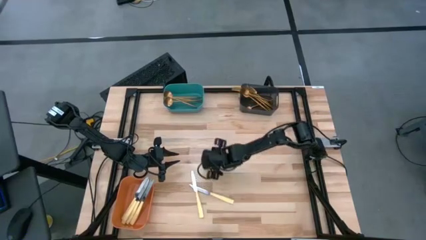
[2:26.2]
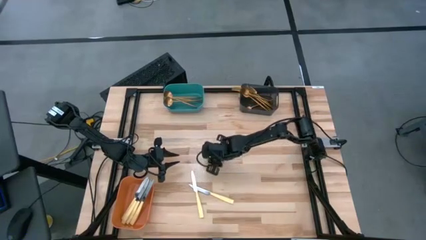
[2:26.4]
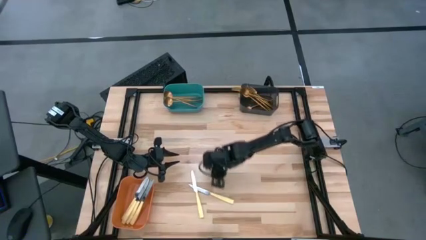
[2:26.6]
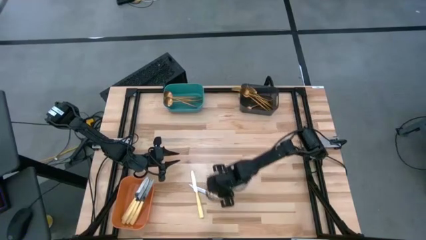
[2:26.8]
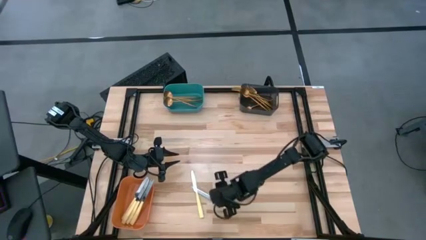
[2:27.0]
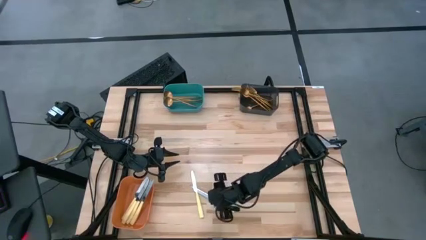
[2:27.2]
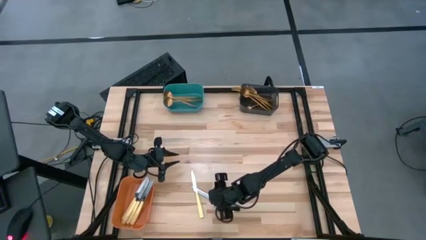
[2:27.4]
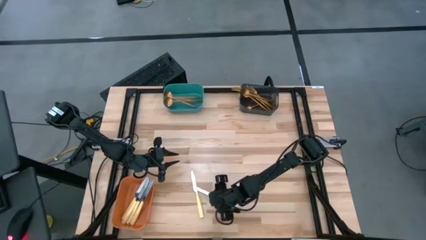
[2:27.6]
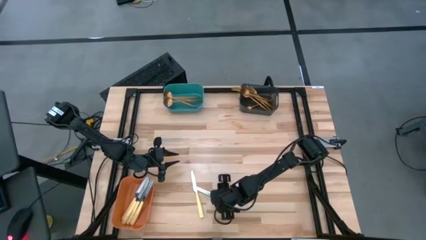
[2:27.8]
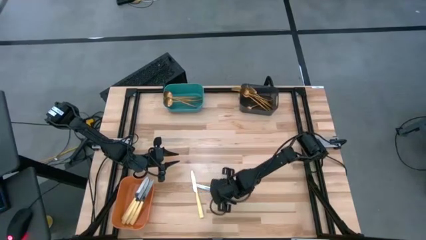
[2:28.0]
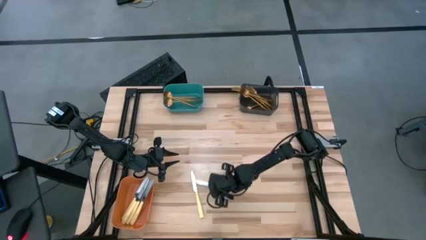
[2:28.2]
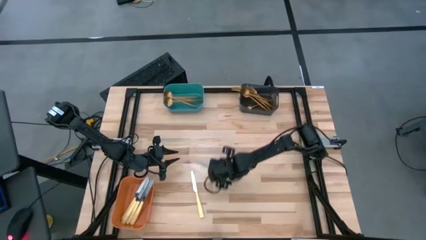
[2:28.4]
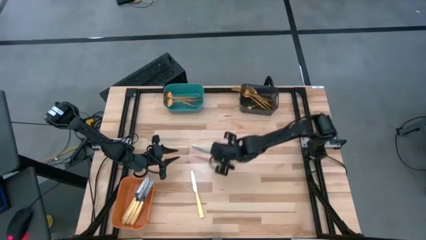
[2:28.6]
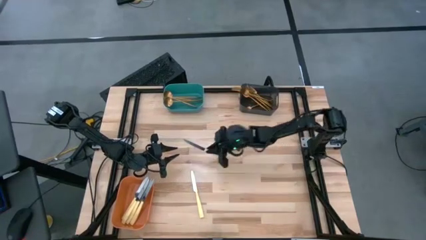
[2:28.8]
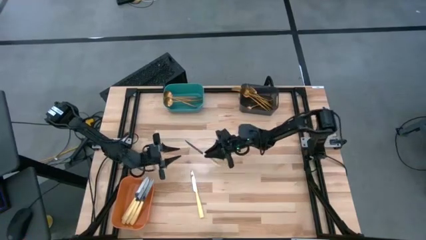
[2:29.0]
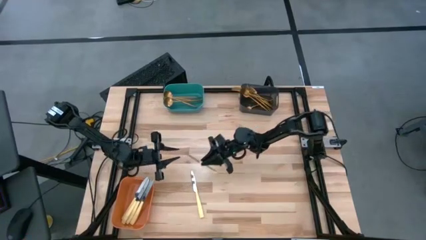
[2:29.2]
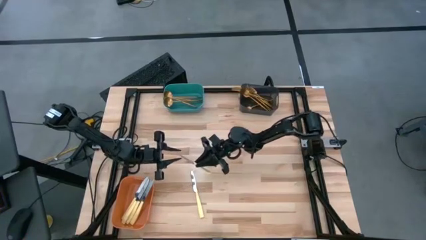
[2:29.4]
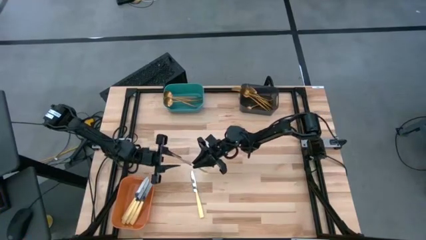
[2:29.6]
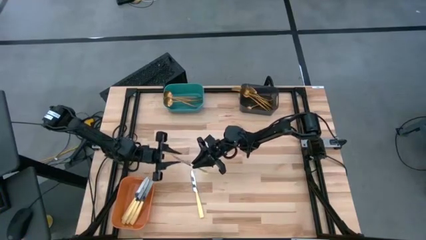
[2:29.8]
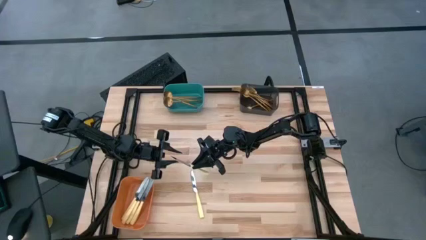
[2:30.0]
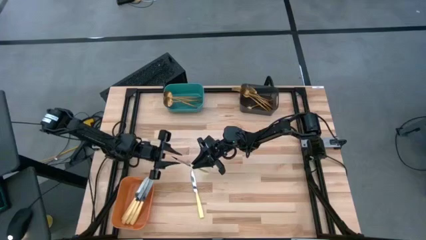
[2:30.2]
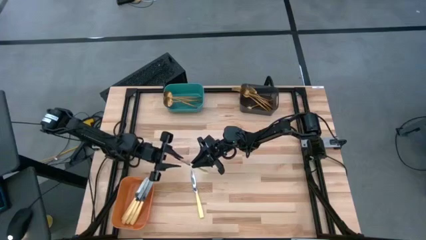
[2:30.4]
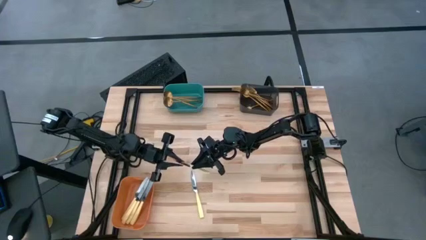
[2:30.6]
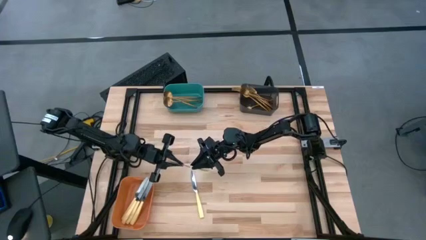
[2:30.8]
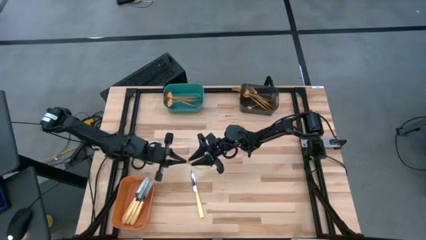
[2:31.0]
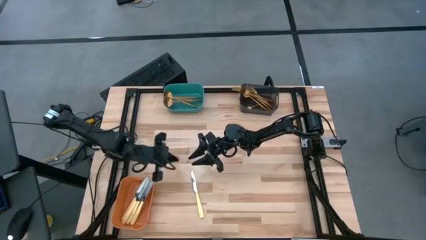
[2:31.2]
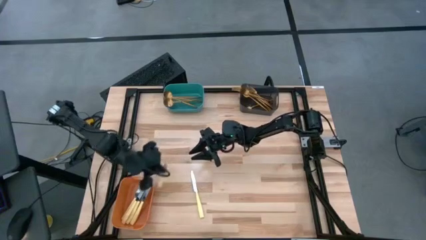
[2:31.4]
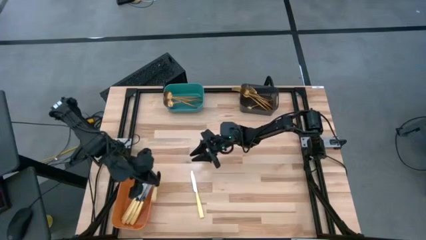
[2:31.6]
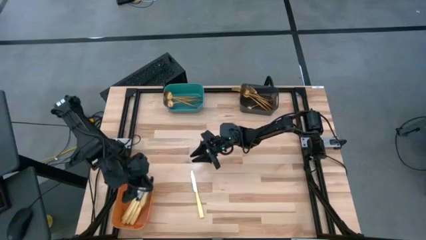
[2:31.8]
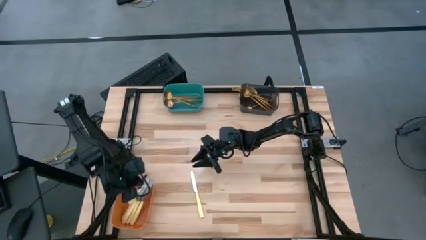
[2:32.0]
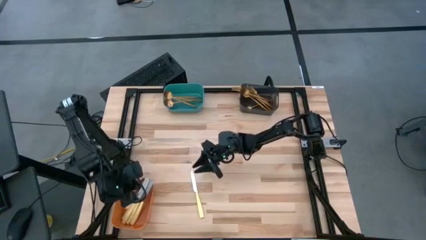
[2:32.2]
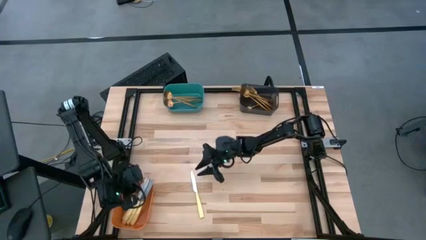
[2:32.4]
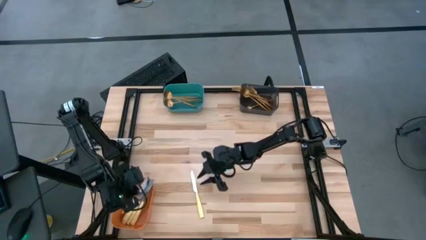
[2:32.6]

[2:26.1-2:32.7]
Task: Sort silverware by color (type)
Put the yellow table knife into the orange bin

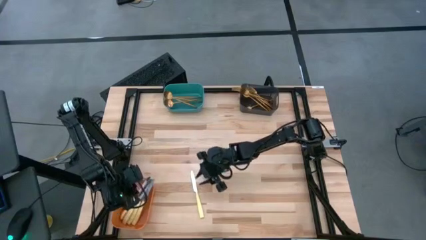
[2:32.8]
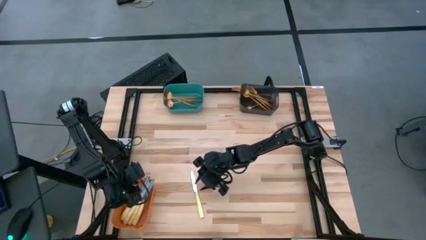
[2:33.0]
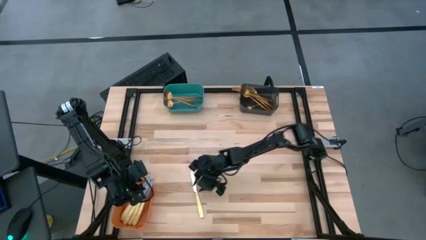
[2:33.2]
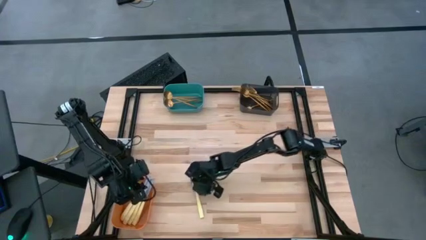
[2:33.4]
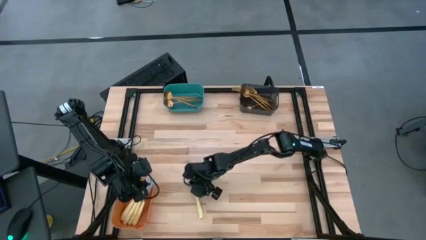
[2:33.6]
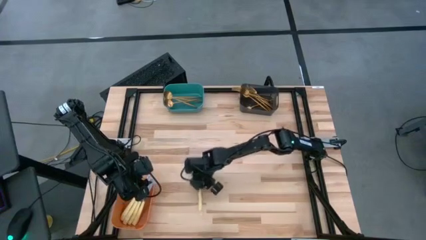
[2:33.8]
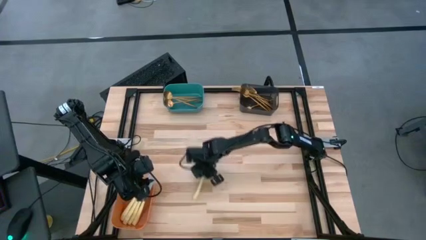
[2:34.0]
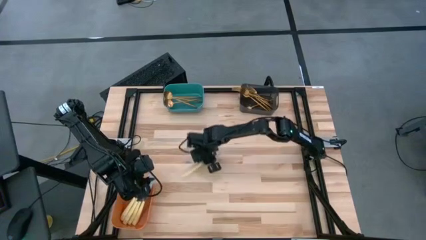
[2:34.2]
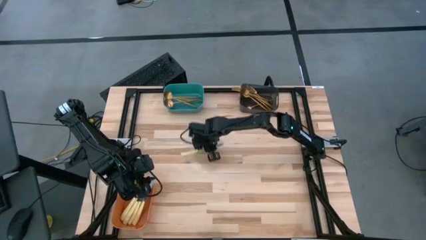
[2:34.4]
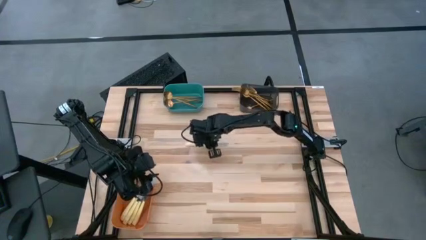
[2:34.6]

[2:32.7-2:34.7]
Put the yellow table knife into the orange bin

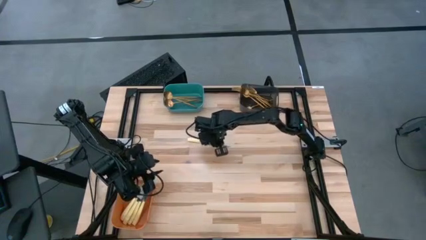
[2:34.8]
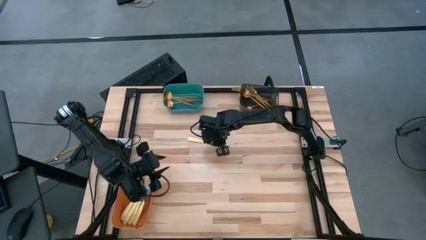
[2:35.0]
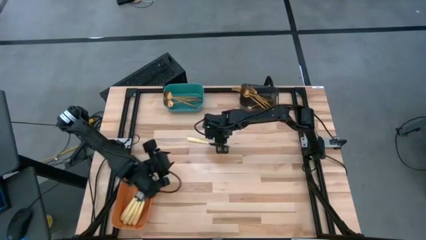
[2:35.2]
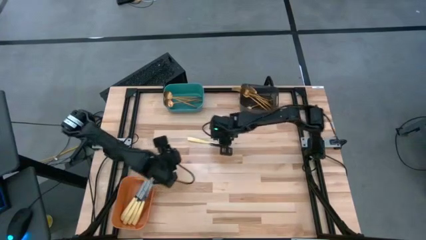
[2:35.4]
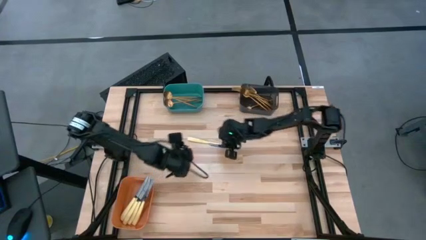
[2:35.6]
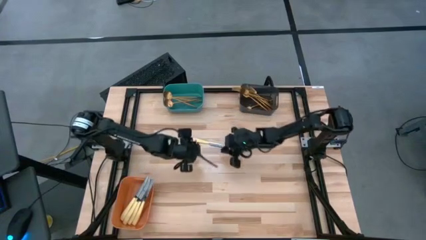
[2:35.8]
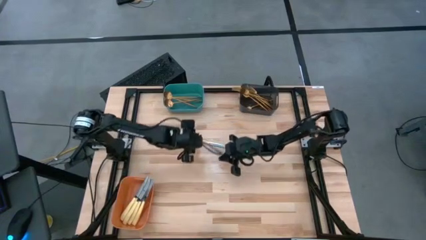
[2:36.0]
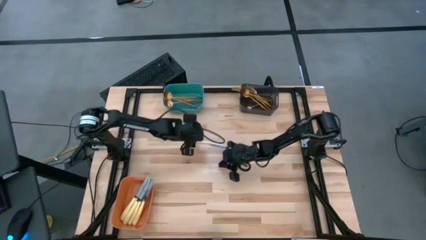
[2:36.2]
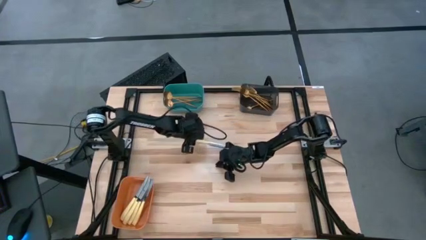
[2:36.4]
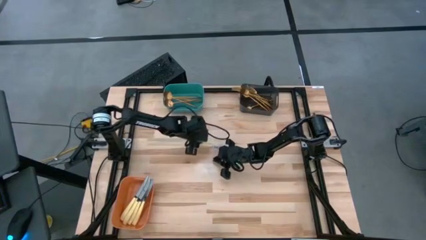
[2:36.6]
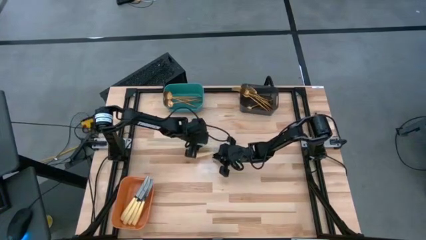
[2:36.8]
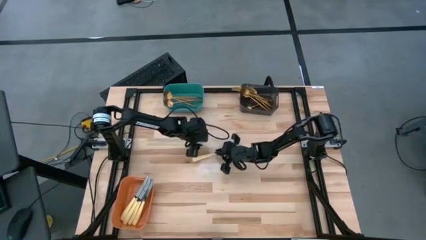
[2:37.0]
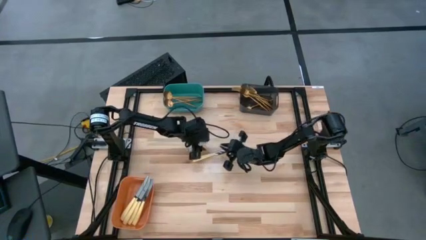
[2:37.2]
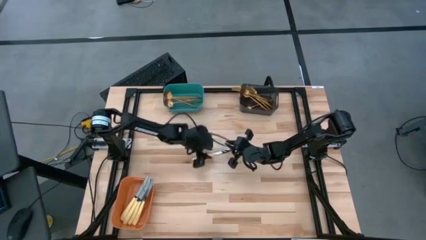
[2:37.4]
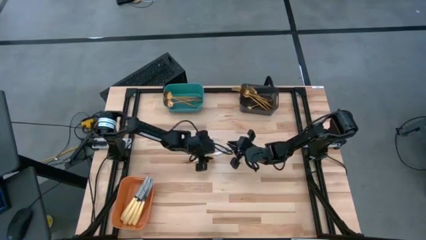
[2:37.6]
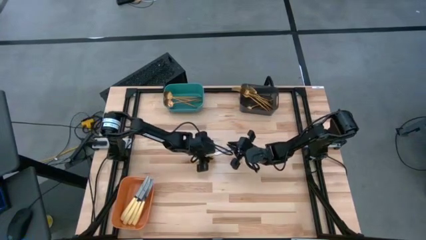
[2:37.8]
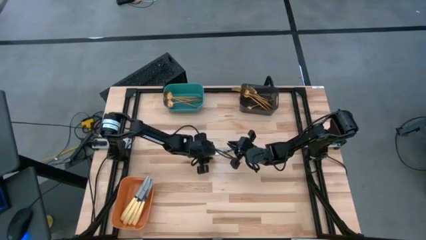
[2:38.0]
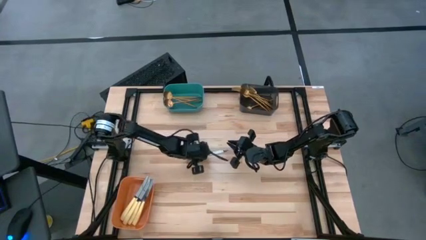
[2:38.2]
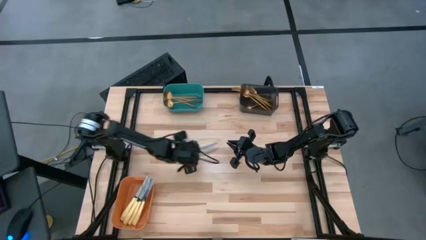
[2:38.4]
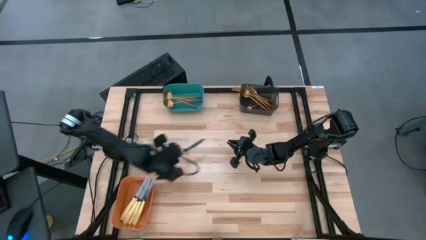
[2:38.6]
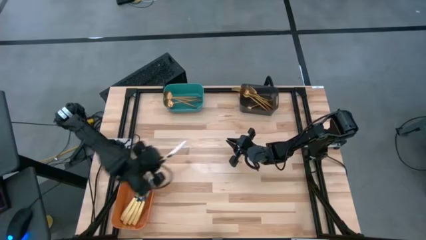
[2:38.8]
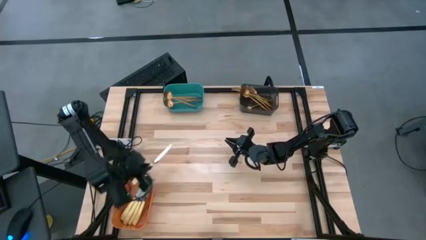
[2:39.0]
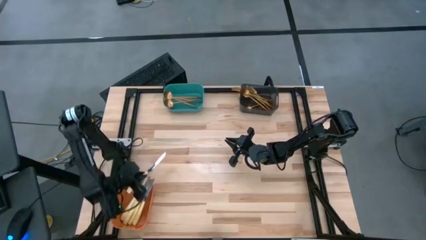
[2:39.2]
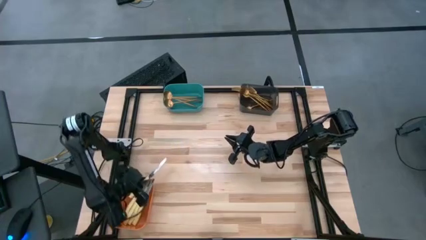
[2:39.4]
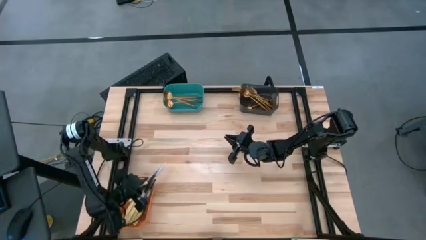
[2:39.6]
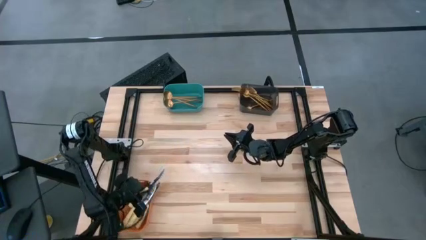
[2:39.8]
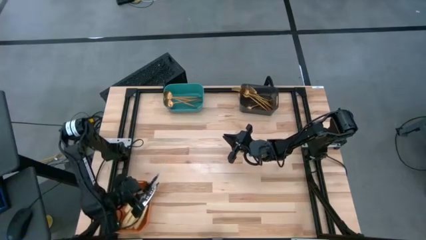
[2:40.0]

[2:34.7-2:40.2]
Put the yellow table knife into the orange bin
